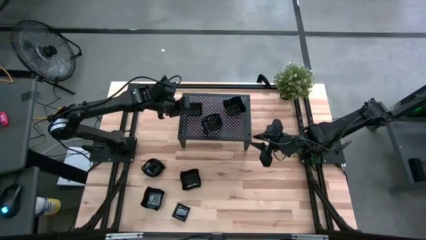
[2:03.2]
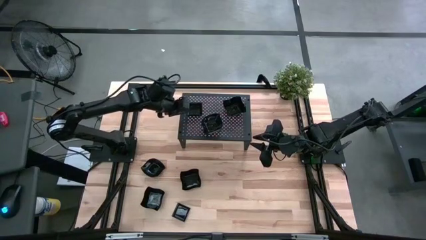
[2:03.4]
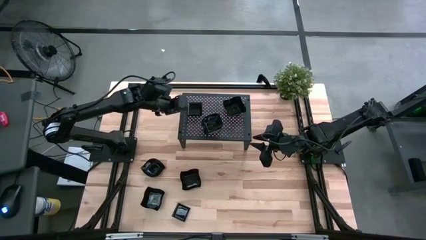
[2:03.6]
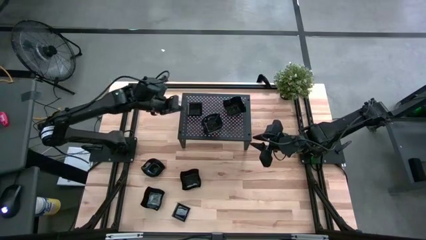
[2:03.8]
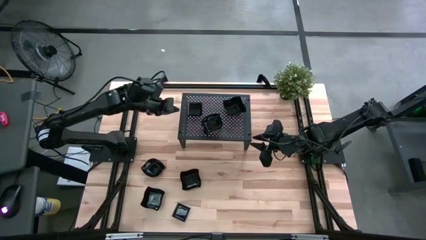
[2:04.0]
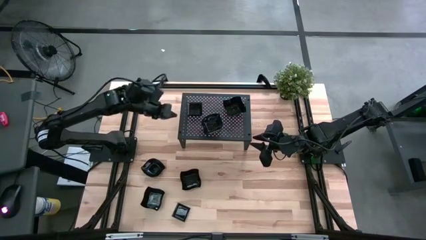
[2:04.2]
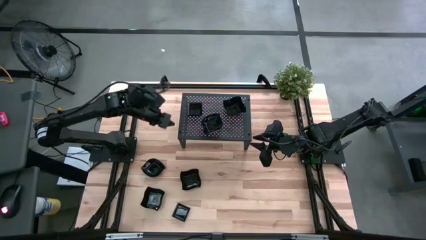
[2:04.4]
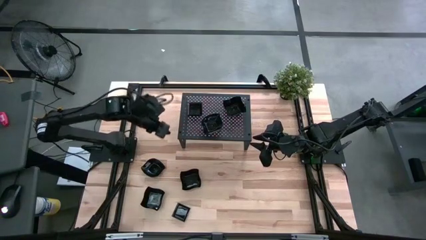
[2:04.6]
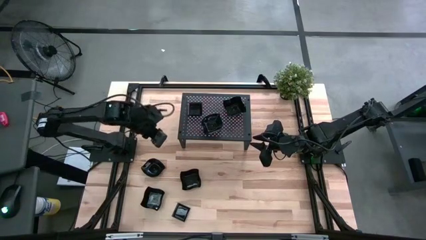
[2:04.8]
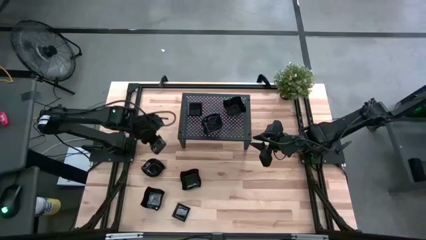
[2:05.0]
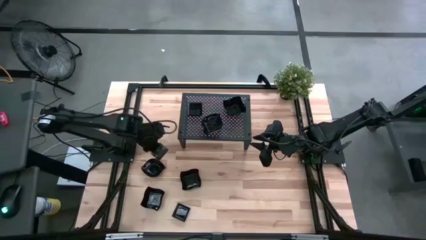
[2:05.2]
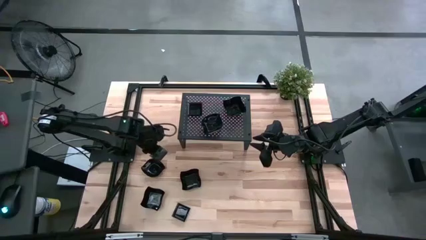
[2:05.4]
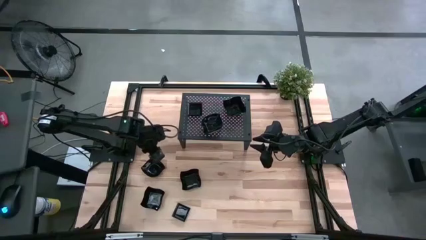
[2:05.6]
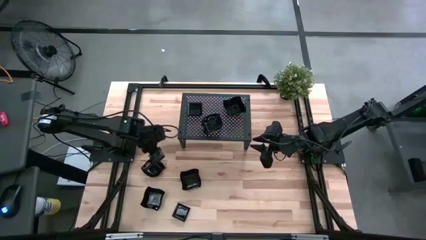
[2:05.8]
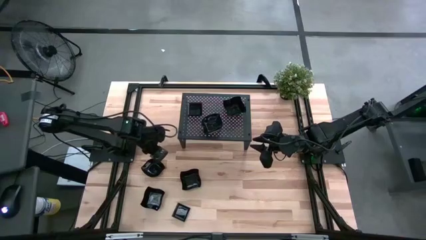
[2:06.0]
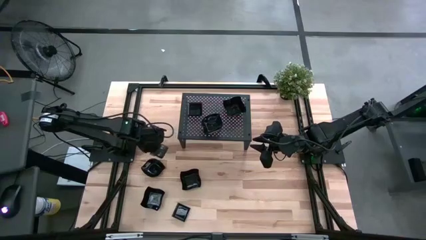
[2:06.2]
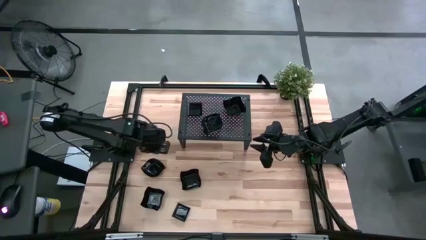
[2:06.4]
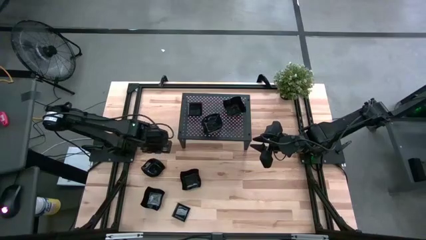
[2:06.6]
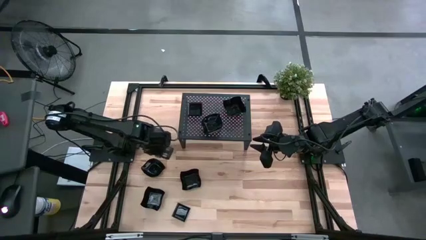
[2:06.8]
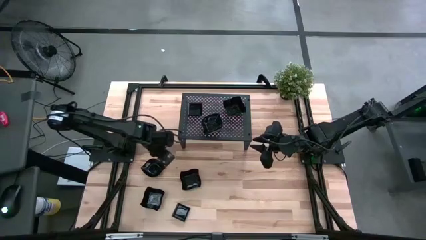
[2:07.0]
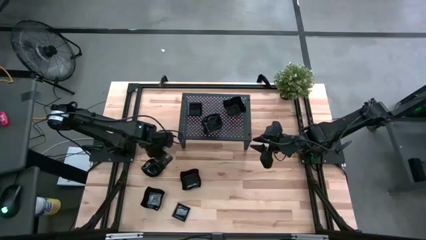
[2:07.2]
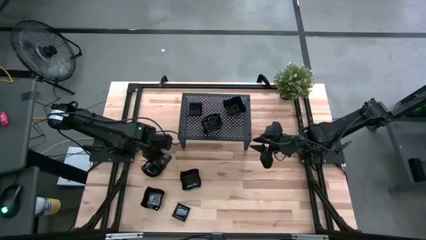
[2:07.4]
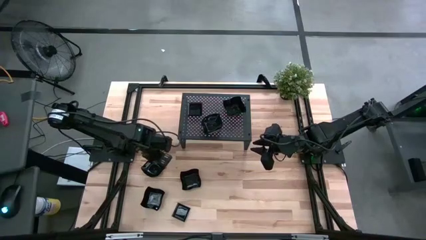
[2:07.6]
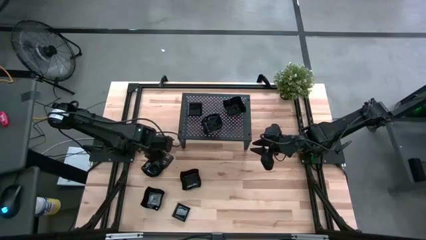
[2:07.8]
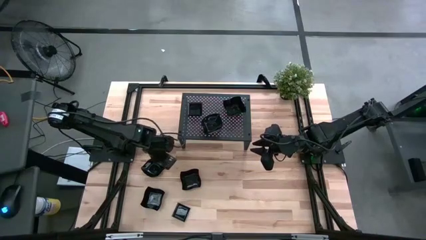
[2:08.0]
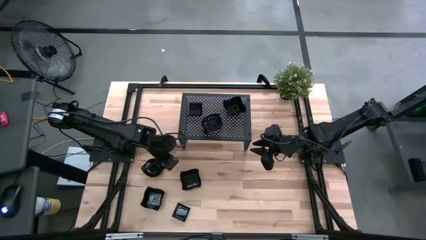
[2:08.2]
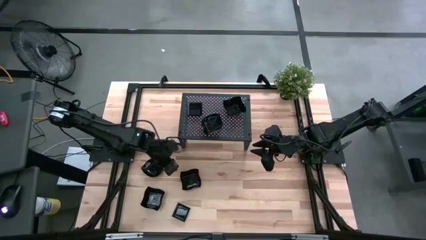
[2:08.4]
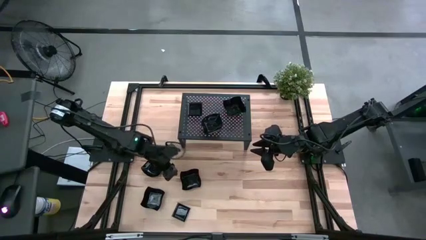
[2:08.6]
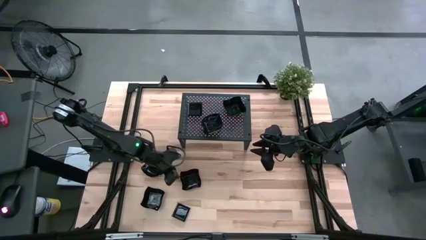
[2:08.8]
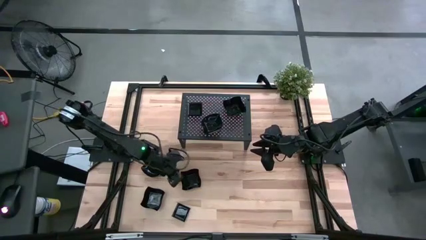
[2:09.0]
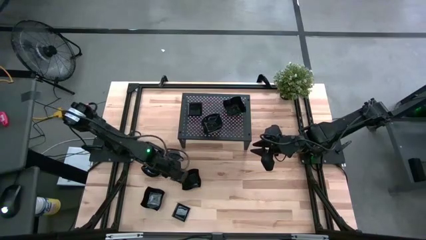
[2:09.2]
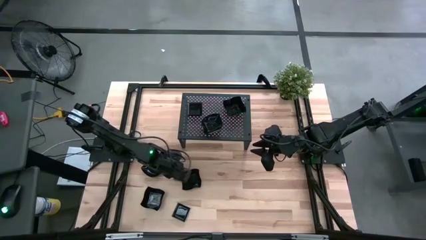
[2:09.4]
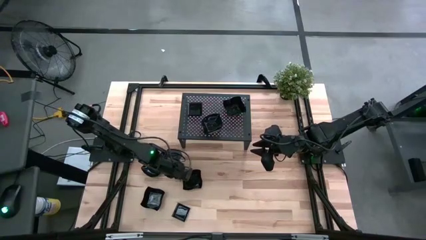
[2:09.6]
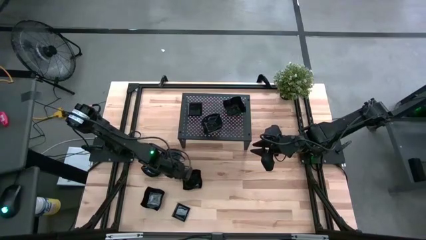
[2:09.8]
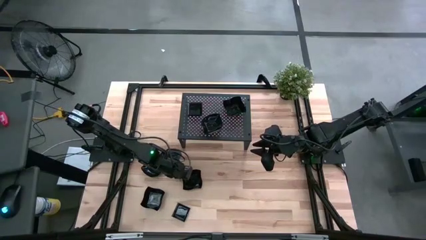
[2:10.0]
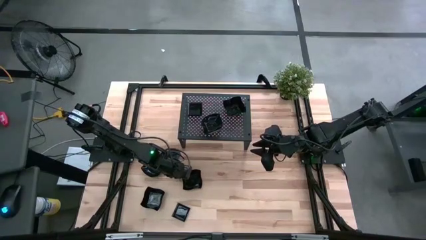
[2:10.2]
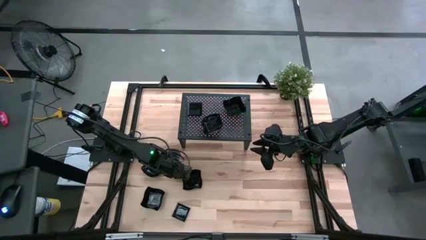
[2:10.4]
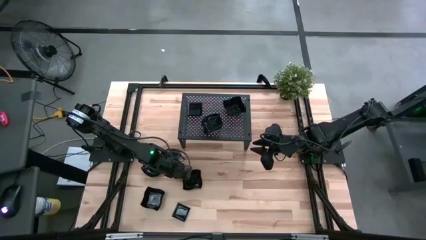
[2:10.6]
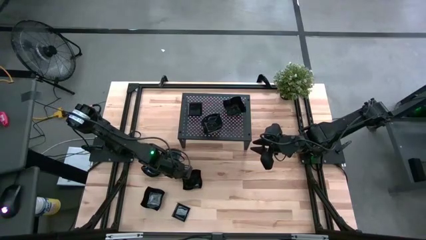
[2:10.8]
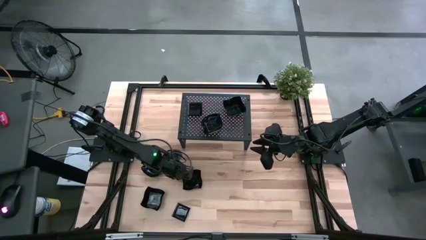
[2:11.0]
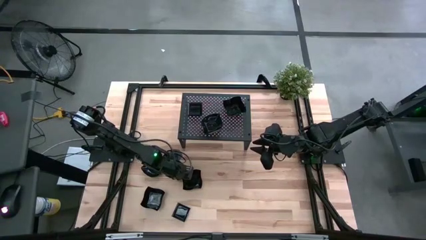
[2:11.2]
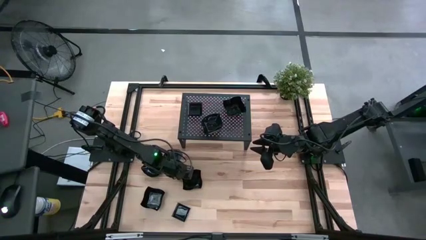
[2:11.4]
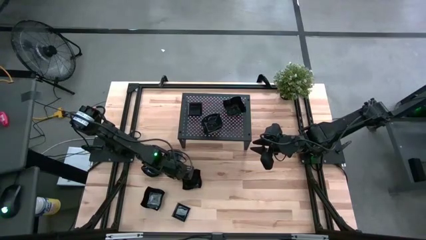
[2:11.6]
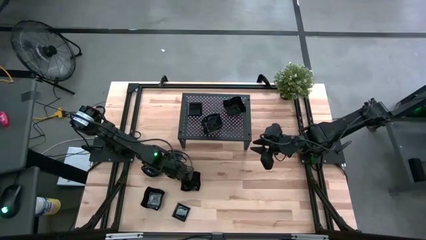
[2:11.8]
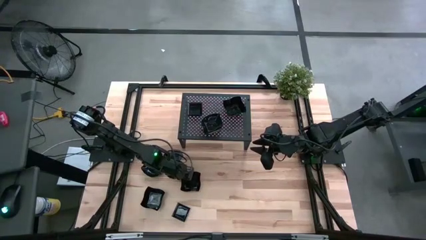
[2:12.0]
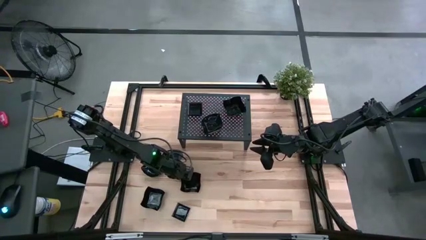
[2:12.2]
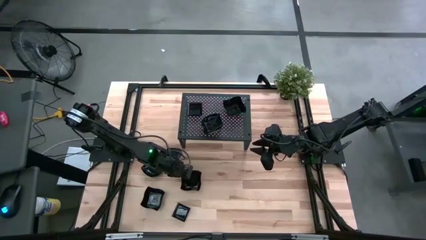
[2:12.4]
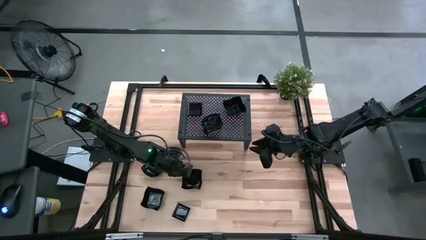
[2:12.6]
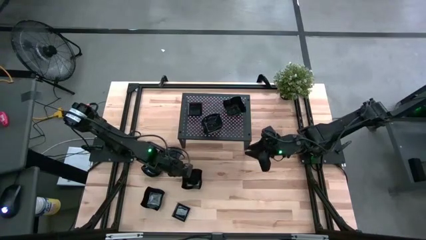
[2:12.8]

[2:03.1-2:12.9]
Task: Pick & Place Mini shaped plates
Stack the black distorted plate on top of the black distorted plates on the shelf

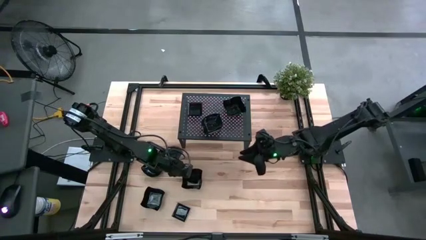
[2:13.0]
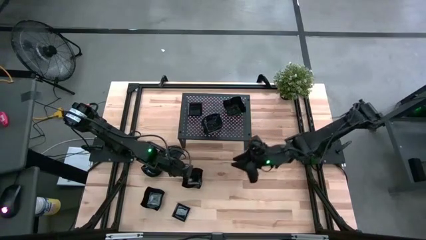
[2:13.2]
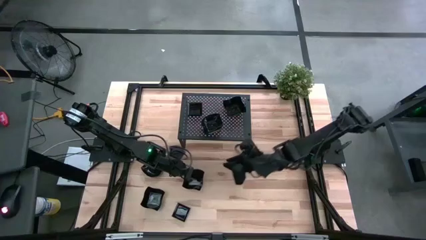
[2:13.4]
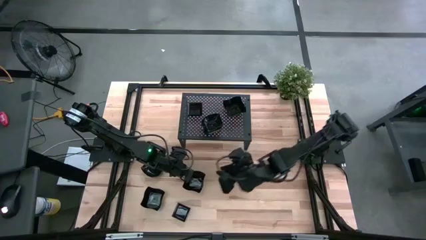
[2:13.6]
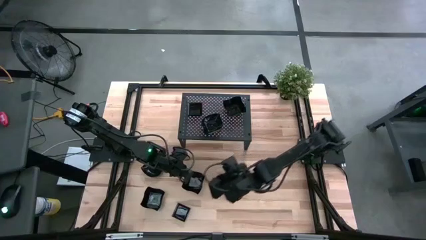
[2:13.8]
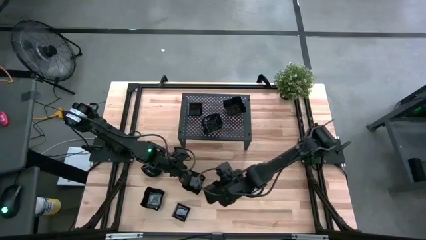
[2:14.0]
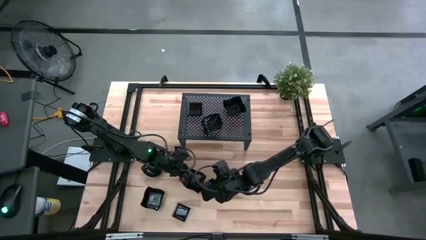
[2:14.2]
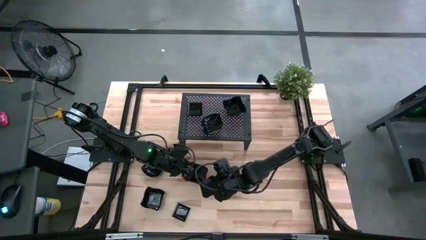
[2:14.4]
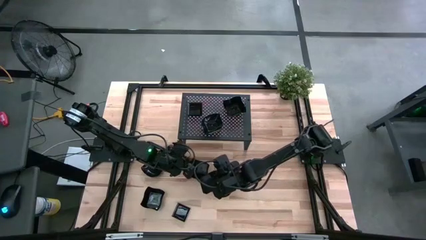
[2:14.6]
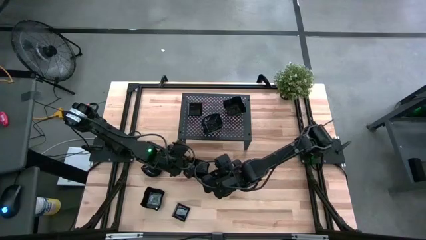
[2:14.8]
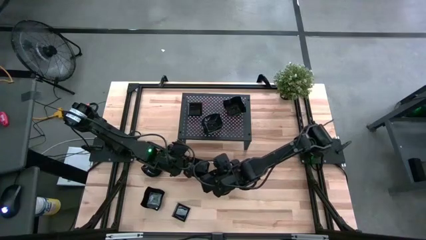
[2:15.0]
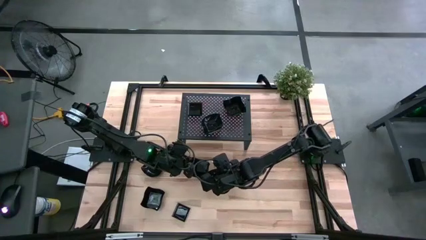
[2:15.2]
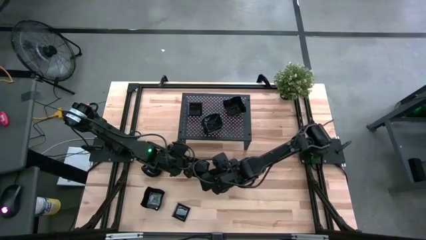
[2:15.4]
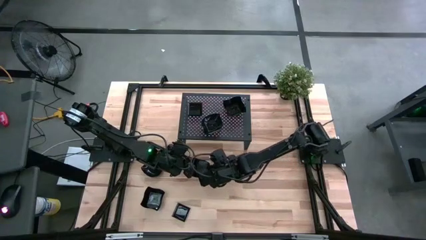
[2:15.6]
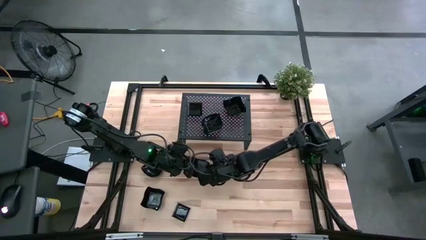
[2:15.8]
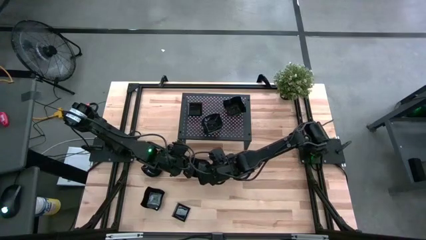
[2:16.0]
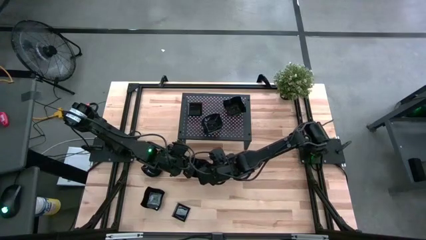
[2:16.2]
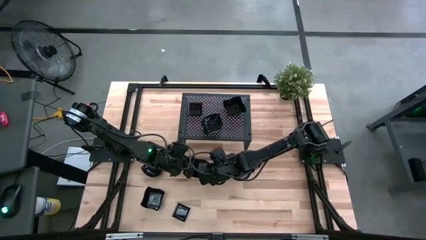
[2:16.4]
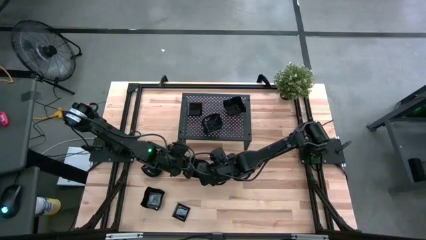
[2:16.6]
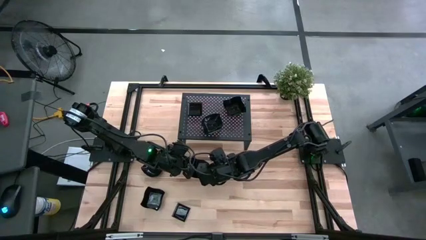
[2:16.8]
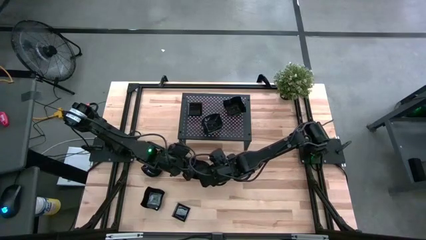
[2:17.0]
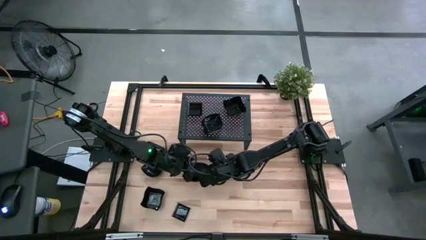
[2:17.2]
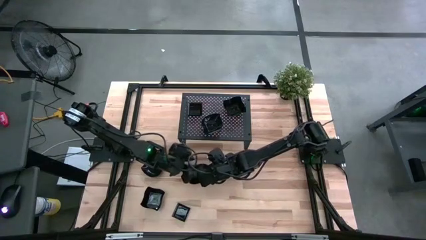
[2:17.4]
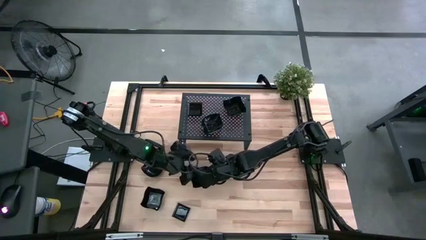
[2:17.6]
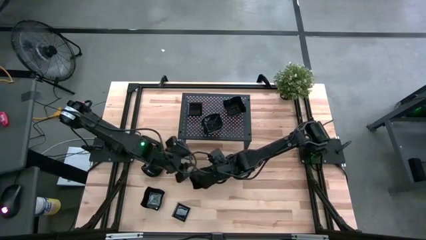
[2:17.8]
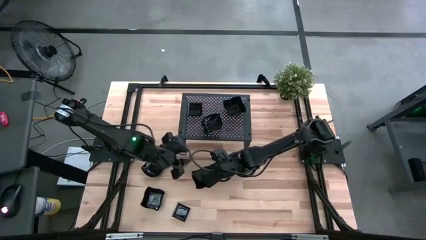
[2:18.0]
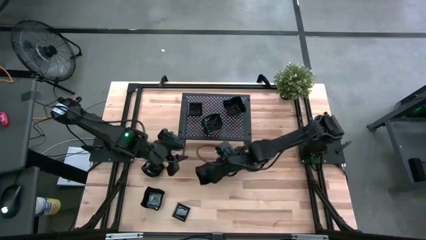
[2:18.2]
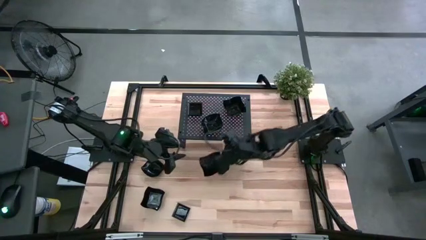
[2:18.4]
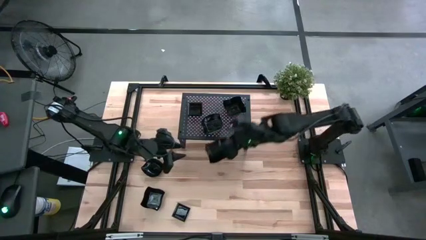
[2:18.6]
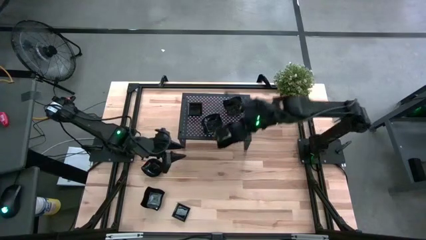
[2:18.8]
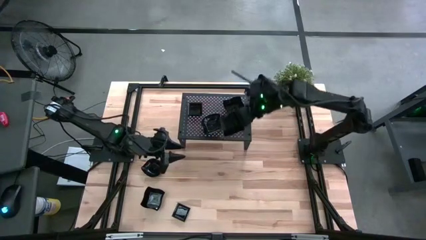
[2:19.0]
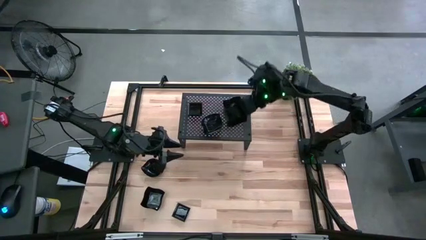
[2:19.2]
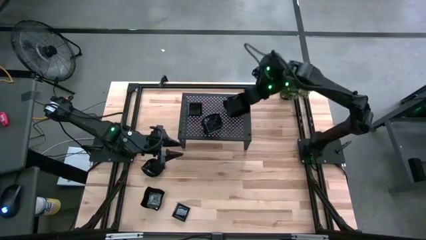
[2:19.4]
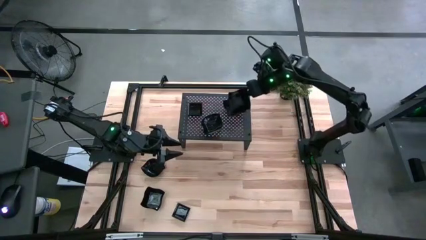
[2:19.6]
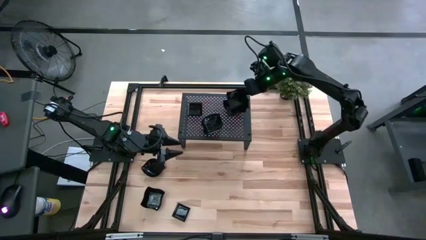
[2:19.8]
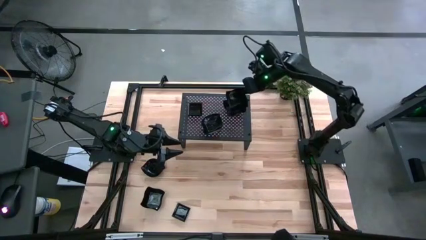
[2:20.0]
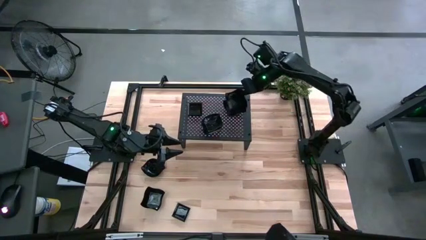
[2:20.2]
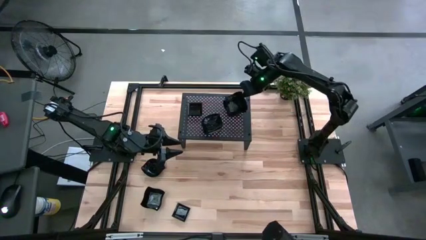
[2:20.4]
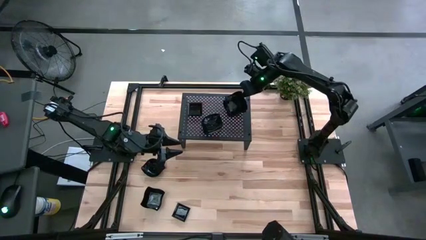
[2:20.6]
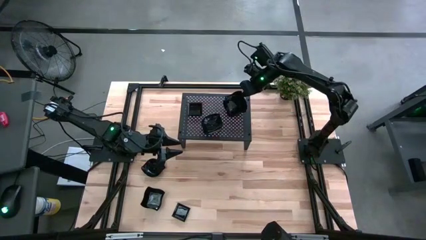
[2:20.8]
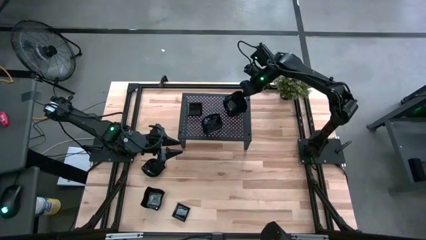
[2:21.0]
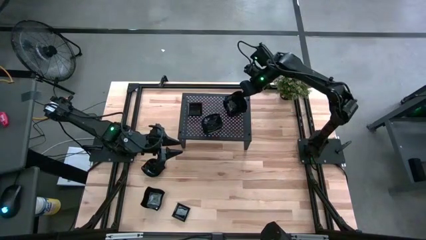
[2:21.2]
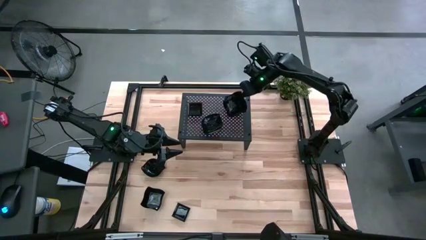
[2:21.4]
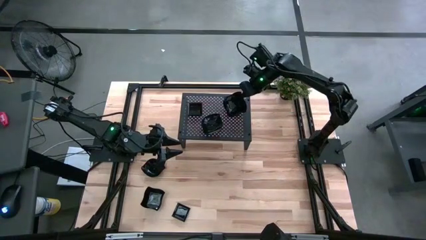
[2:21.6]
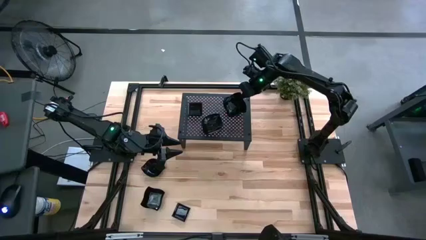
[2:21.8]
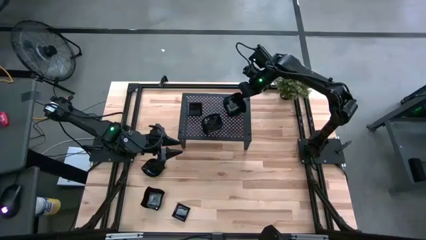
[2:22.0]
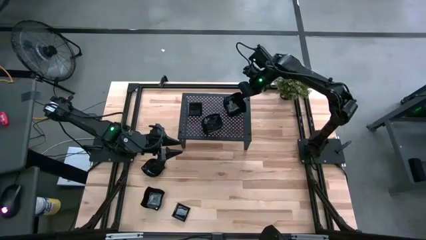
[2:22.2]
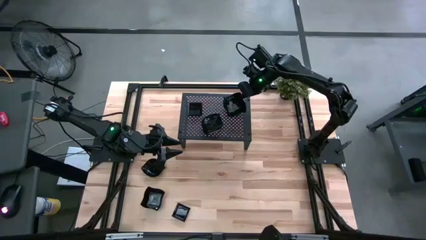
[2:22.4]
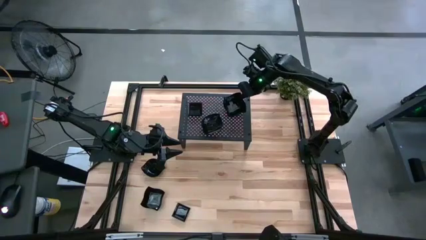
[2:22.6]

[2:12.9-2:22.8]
Stack the black distorted plate on top of the black distorted plates on the shelf
